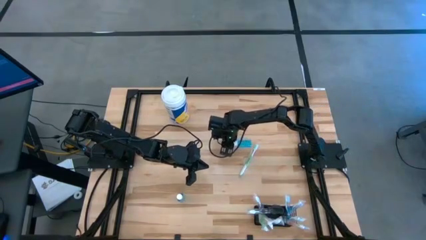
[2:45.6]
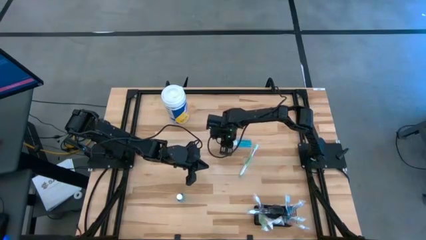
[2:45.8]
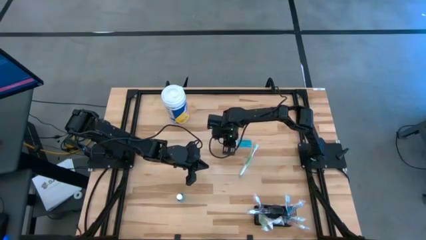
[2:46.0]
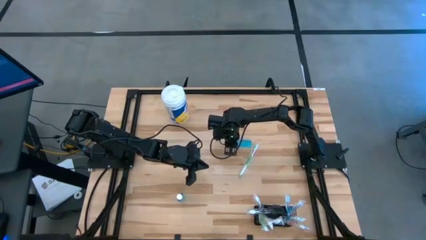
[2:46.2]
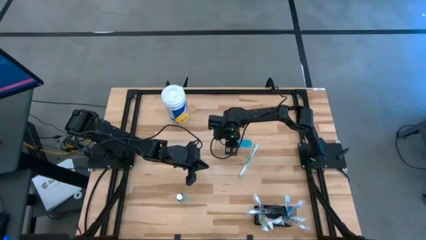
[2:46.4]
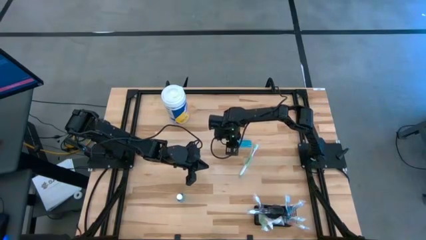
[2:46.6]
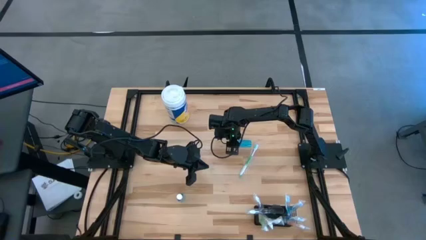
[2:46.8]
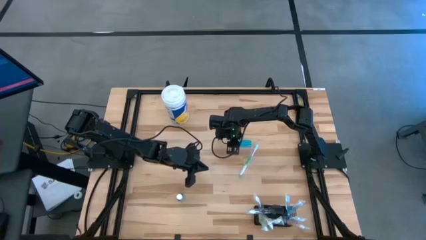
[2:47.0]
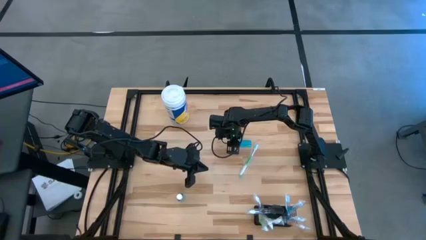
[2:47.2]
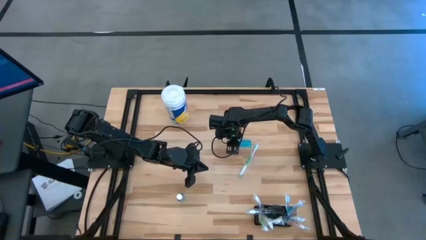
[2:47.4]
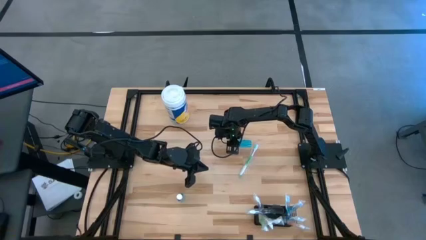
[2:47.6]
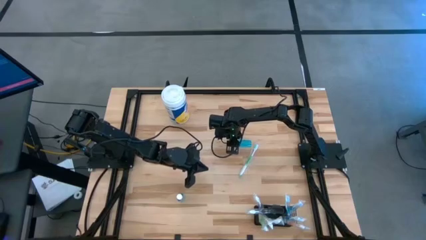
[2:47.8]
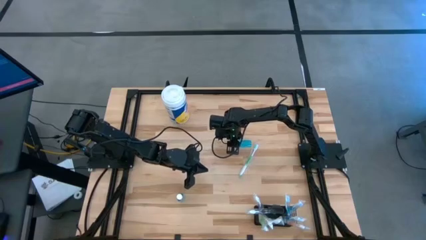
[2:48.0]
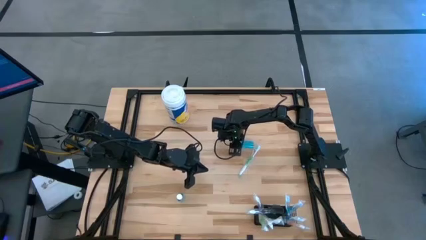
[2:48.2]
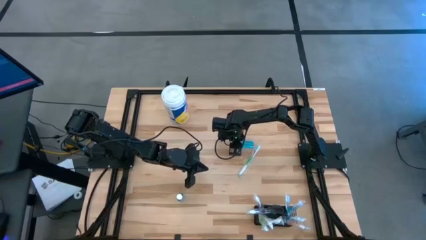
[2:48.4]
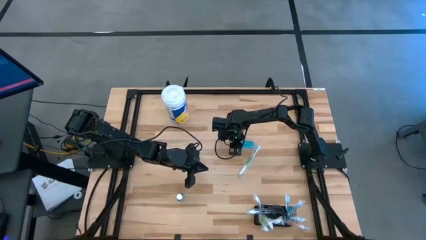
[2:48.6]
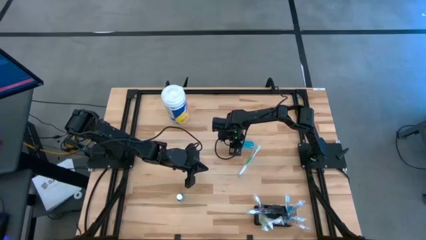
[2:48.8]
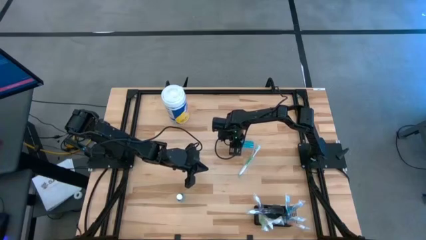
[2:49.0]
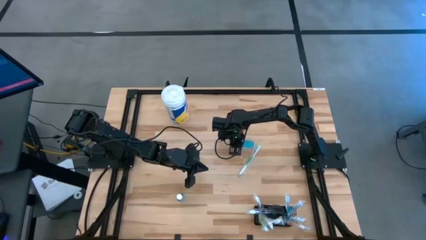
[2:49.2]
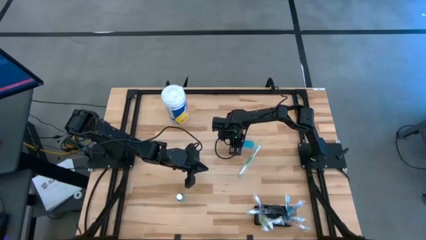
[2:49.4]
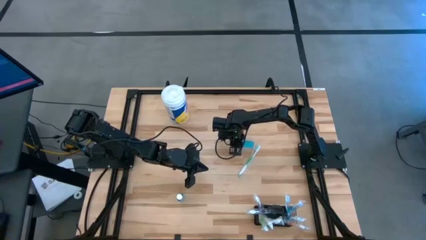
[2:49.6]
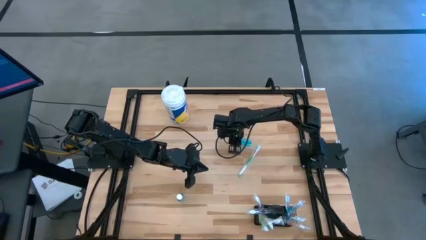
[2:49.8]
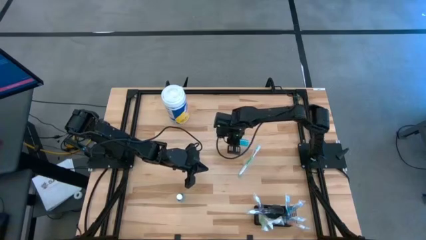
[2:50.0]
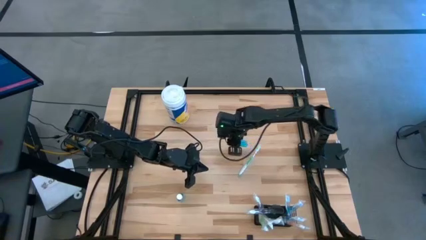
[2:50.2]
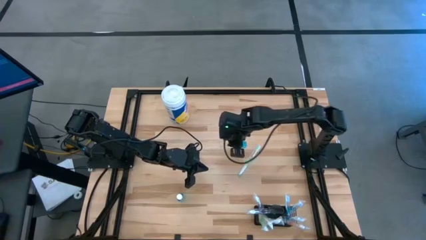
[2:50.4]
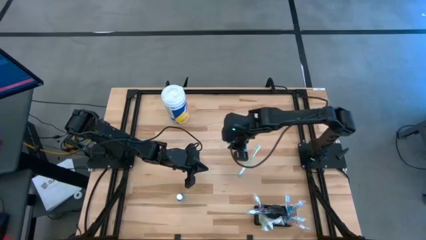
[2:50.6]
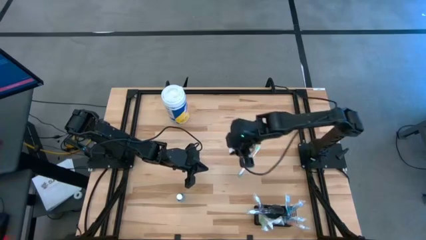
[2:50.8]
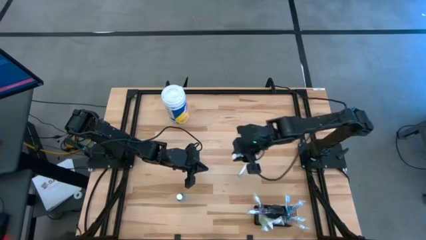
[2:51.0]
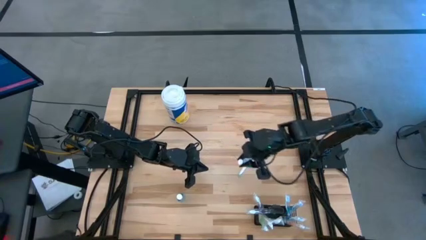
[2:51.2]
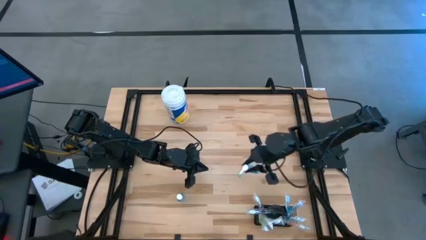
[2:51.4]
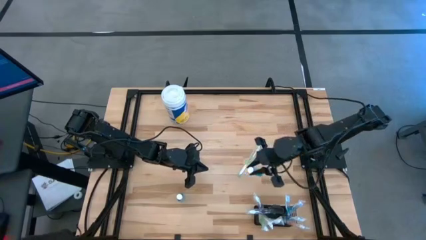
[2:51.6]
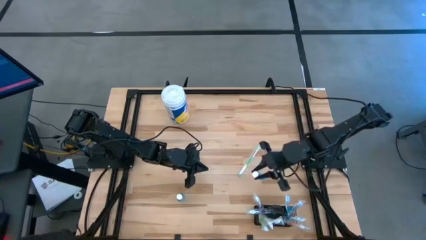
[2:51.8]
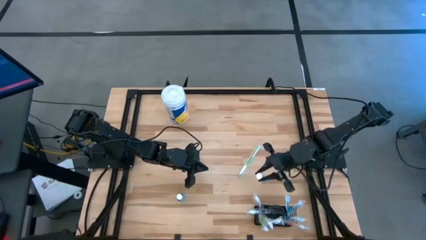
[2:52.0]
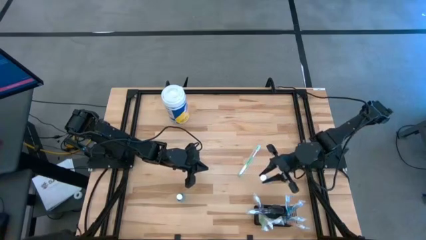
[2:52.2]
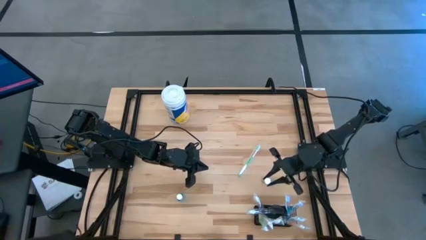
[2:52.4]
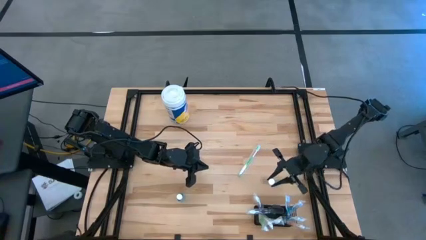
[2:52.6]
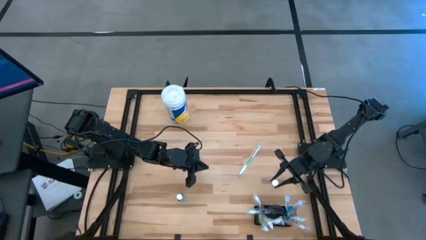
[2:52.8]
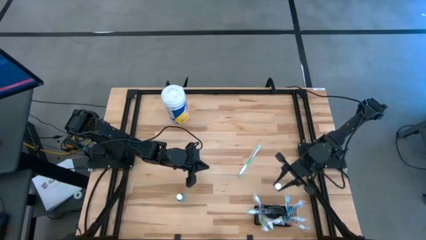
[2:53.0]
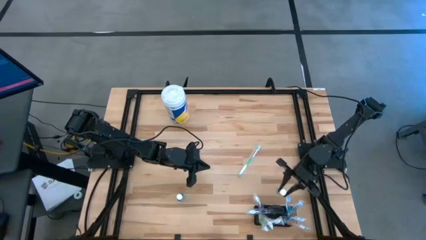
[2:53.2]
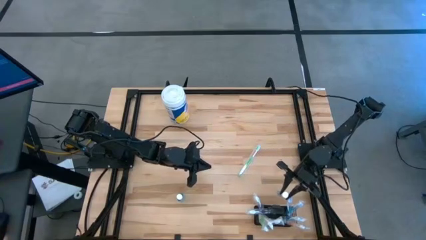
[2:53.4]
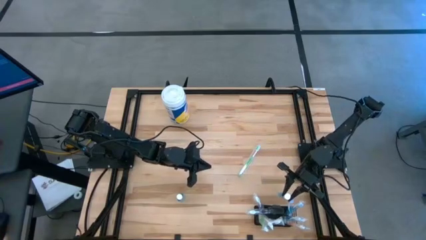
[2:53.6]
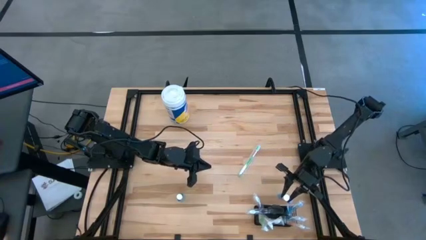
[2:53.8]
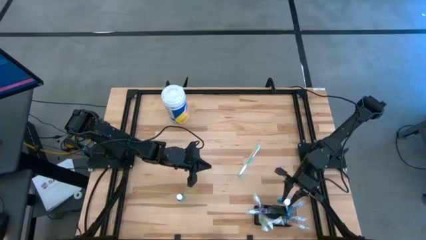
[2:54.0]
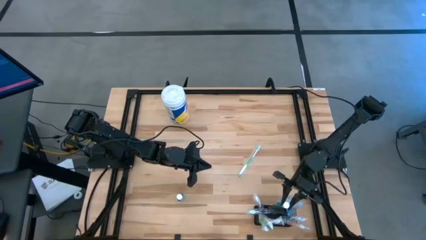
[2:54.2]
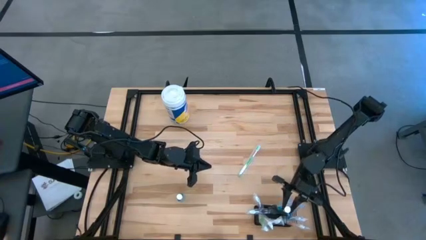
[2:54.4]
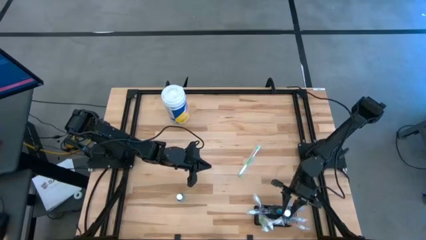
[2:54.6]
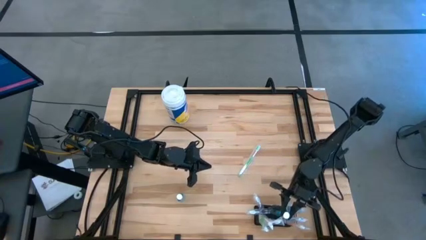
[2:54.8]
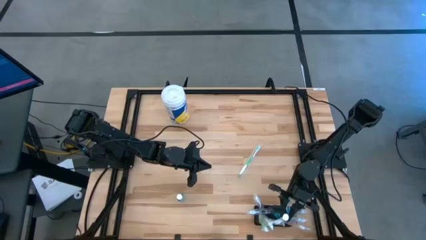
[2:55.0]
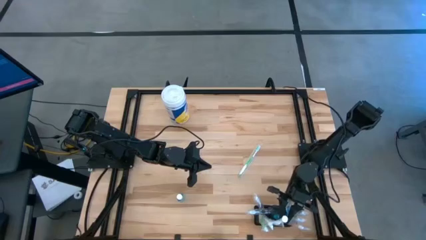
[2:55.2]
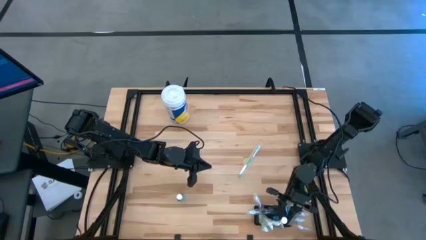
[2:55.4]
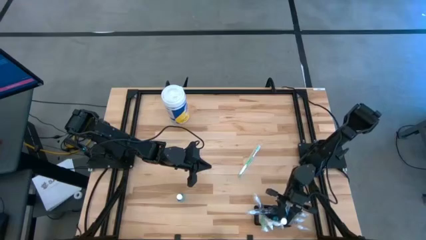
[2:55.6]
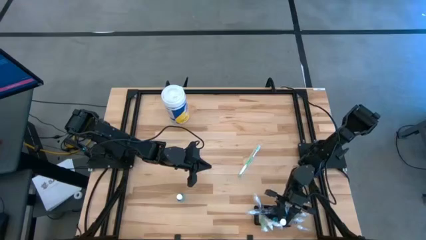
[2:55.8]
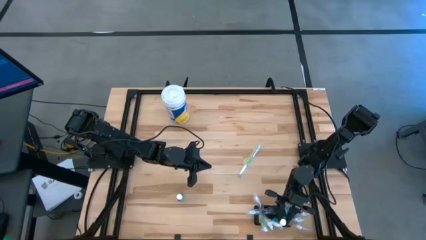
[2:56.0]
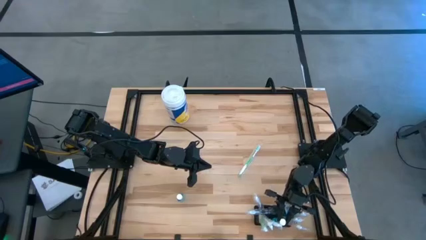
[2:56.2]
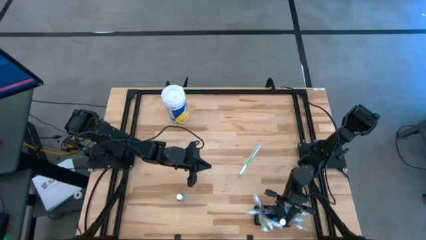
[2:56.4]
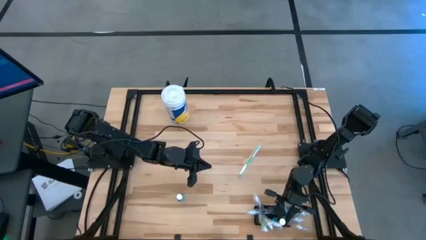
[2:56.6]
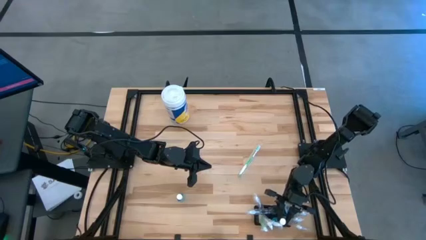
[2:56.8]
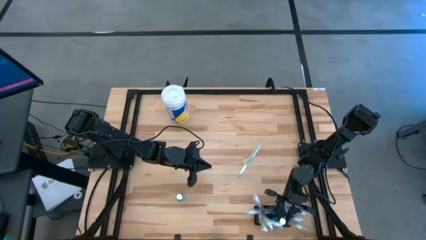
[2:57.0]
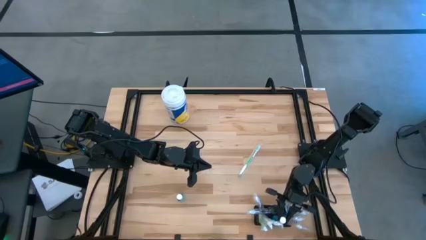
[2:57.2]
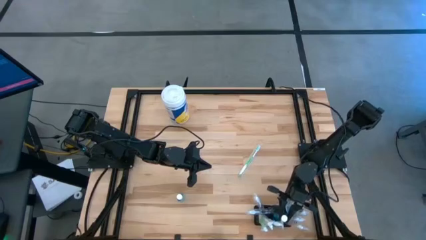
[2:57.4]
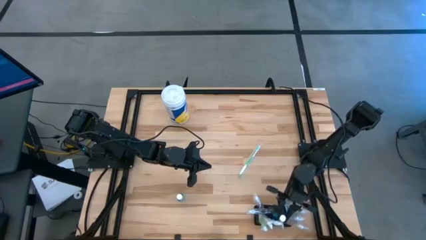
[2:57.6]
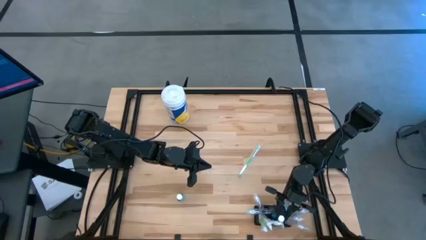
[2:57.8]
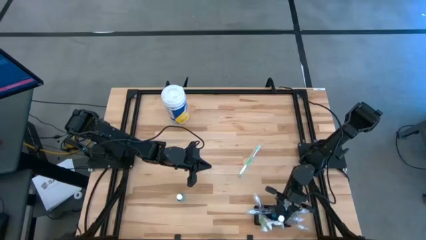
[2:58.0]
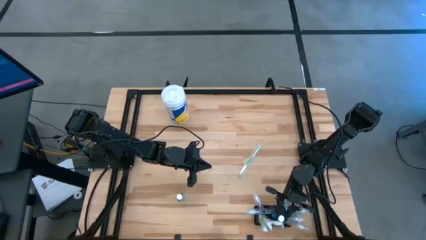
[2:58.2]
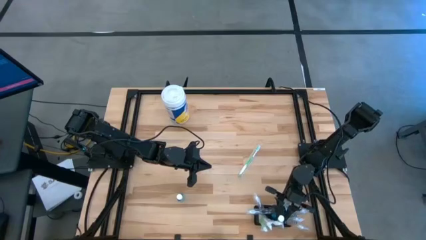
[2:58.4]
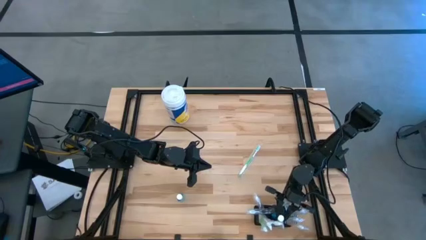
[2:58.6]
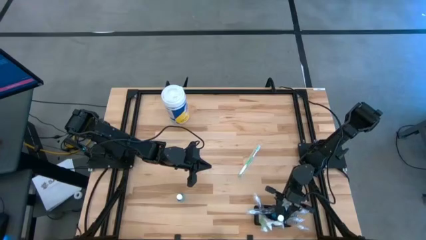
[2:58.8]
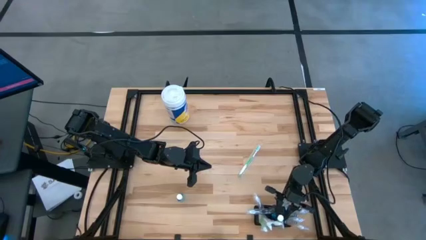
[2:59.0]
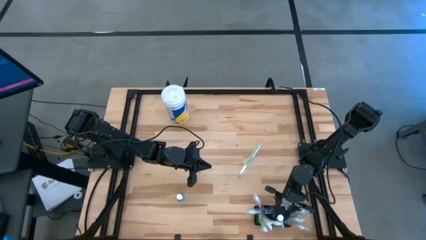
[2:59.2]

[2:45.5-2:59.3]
Task: Pick & Place toothbrushing station
Put the top blue mouthwash into the wire organizer

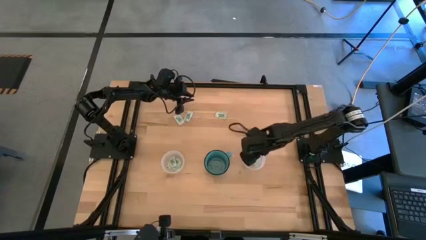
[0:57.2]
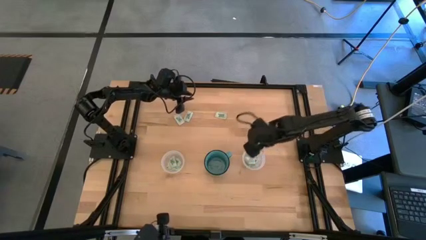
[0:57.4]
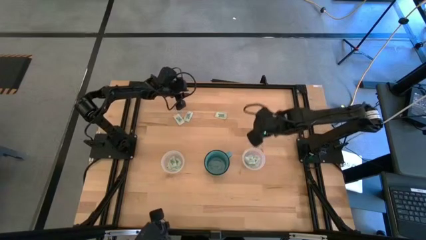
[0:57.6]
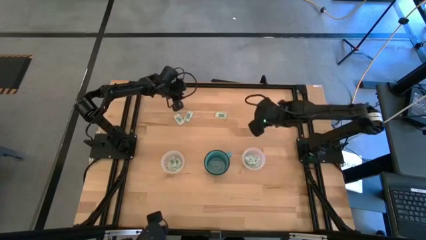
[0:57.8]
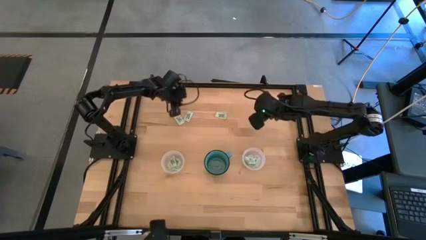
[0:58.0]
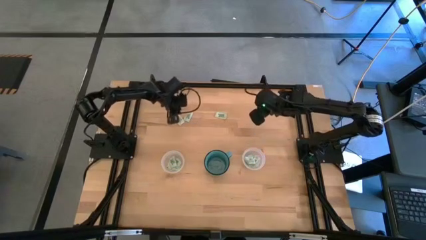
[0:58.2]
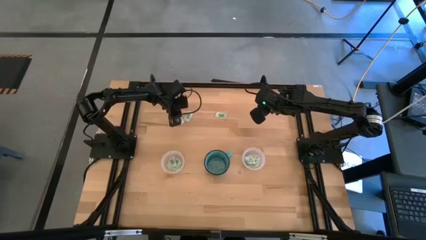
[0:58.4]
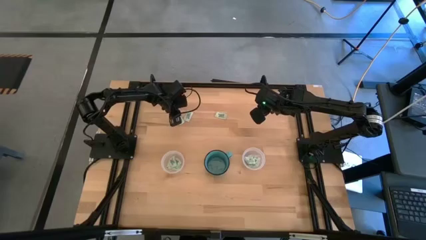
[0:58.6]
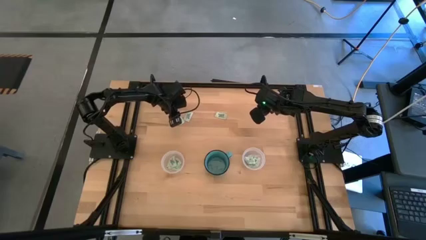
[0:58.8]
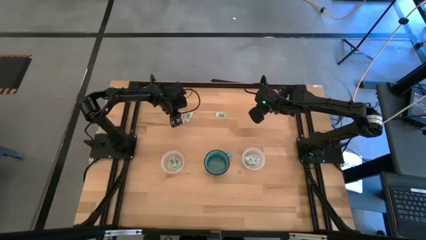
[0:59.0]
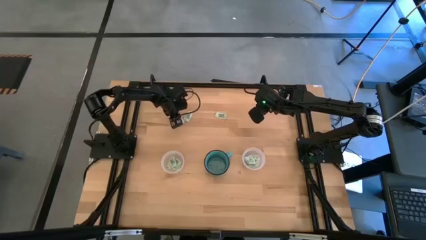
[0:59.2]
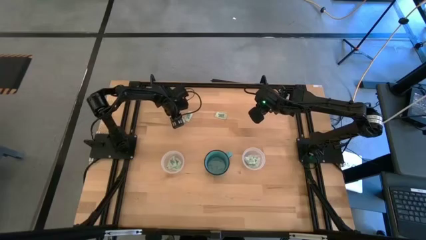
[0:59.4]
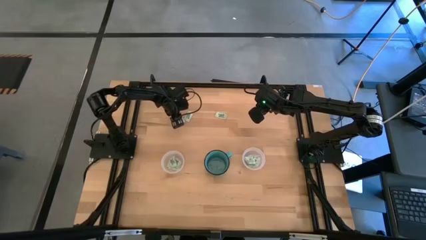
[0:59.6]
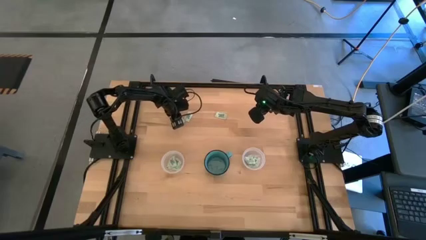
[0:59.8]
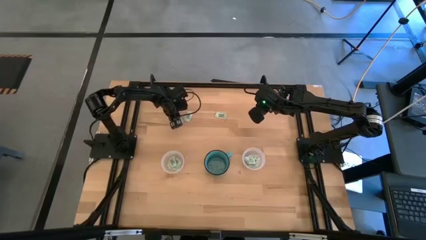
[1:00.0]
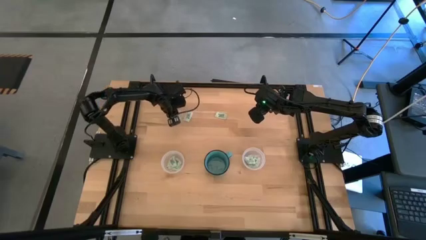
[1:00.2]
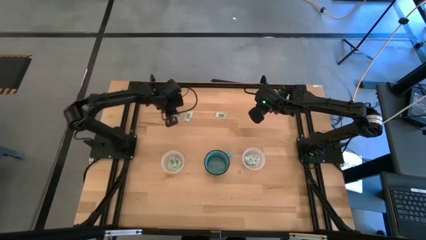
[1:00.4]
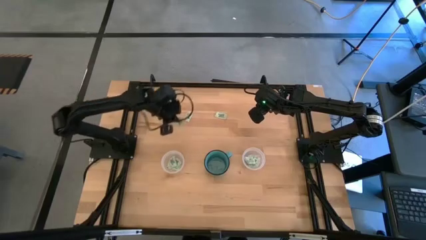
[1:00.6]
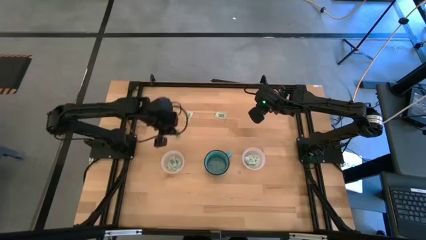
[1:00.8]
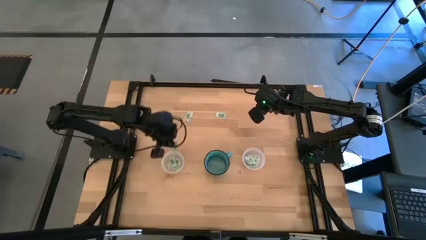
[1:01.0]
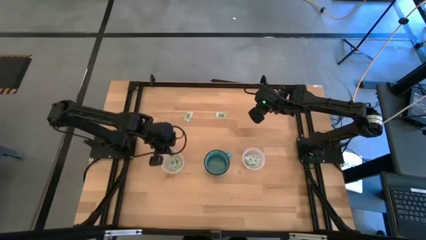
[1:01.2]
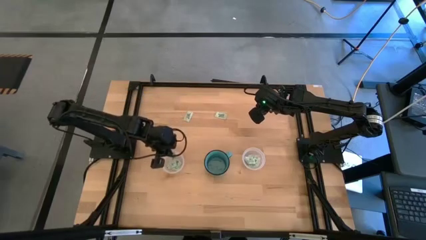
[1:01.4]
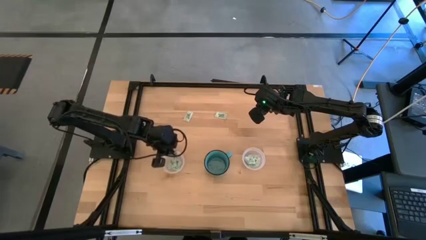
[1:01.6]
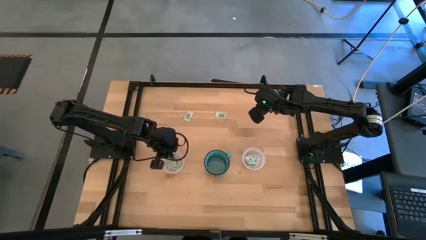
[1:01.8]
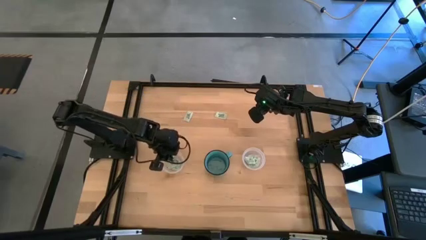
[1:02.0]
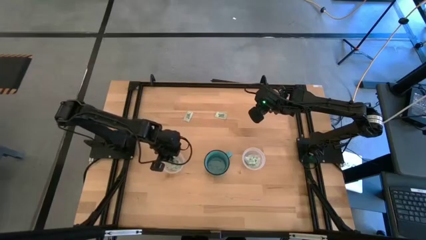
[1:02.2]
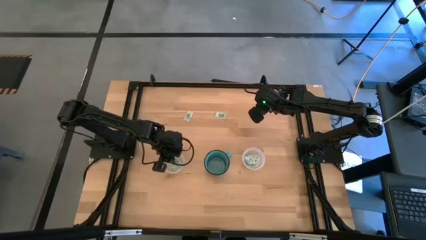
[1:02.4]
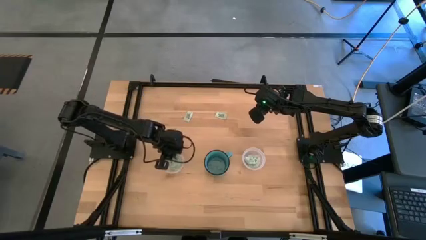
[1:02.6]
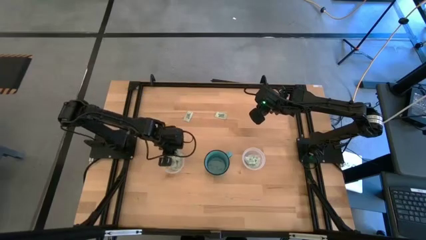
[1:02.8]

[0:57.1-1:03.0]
Task: Pick and place Stevia / Truvia into bins
Put the green stevia packet into the left transparent container
